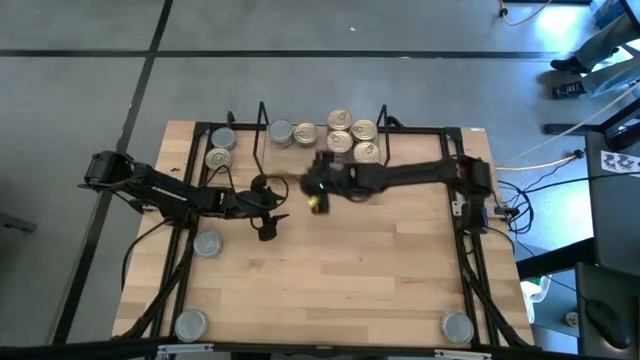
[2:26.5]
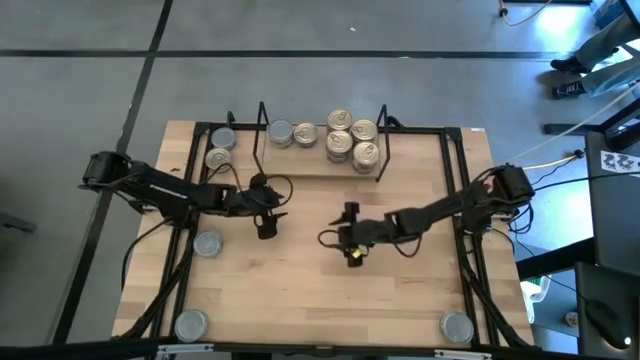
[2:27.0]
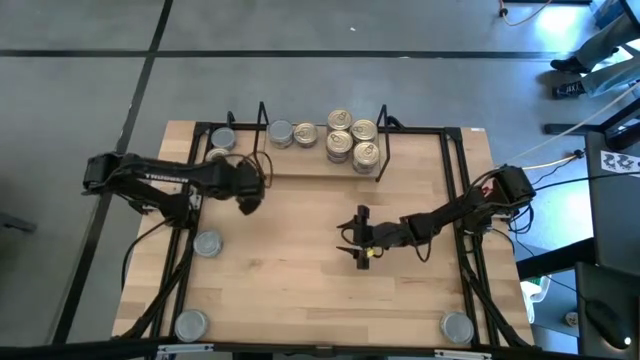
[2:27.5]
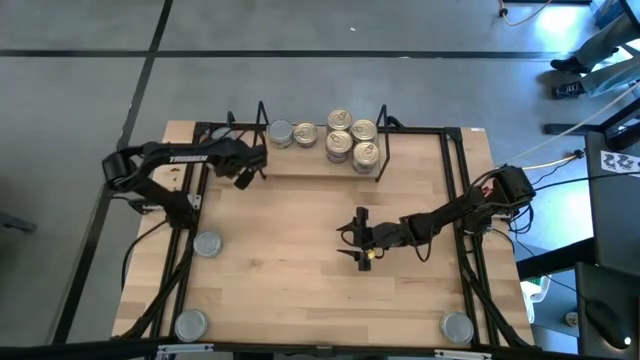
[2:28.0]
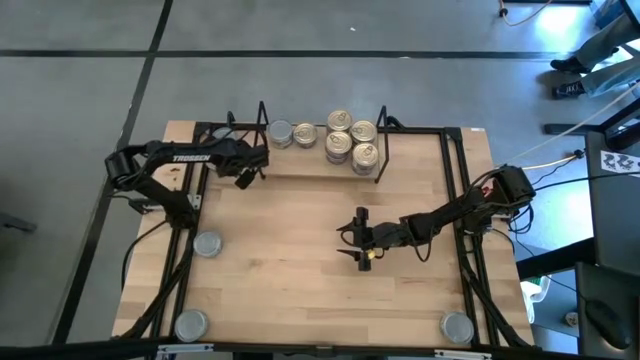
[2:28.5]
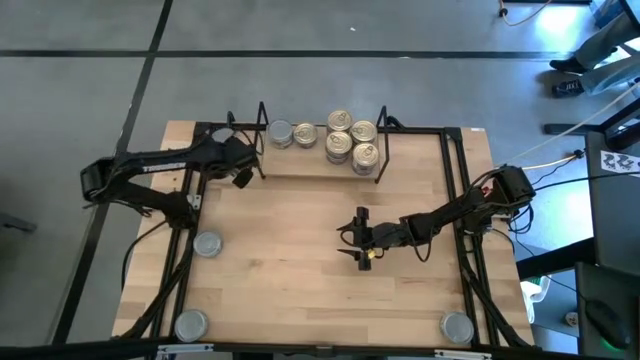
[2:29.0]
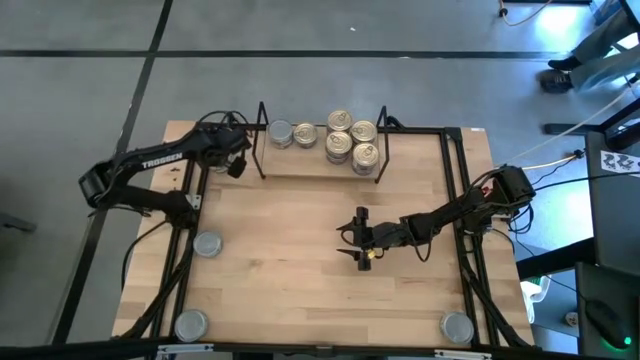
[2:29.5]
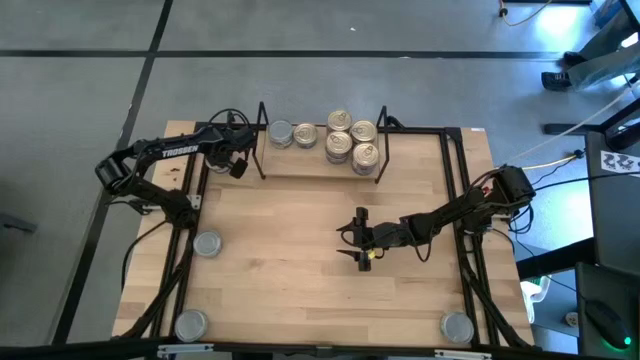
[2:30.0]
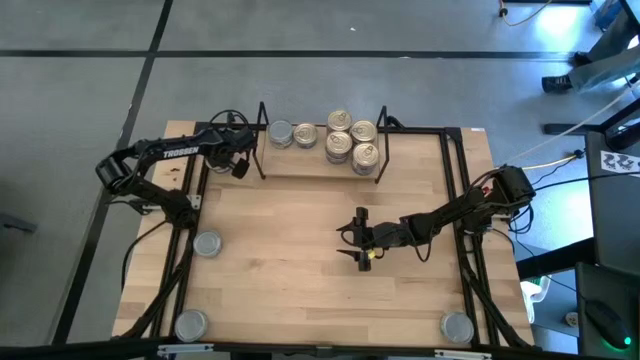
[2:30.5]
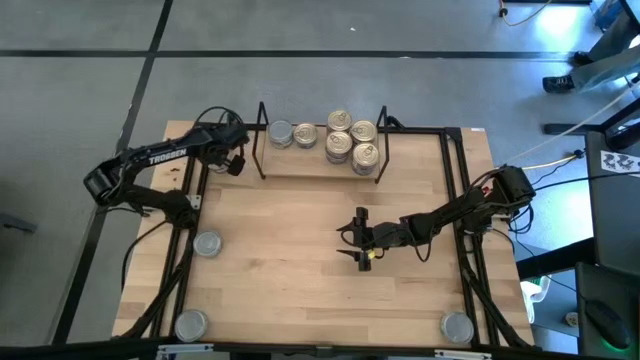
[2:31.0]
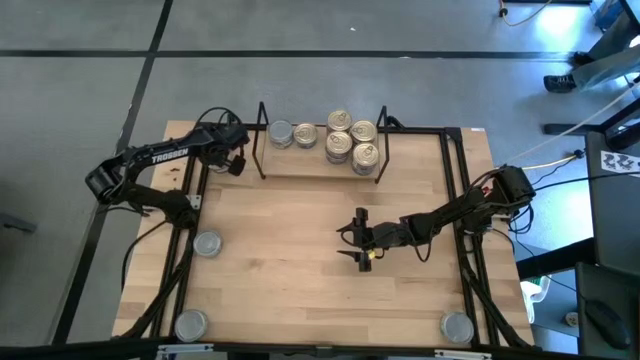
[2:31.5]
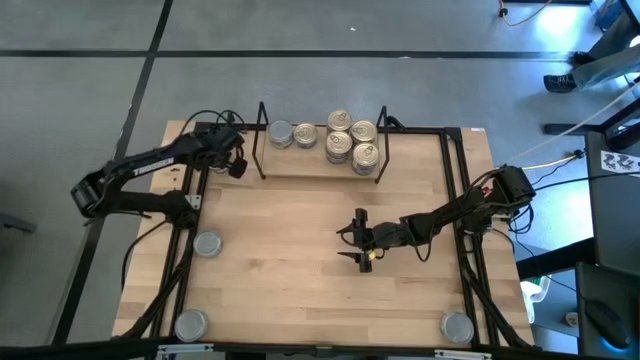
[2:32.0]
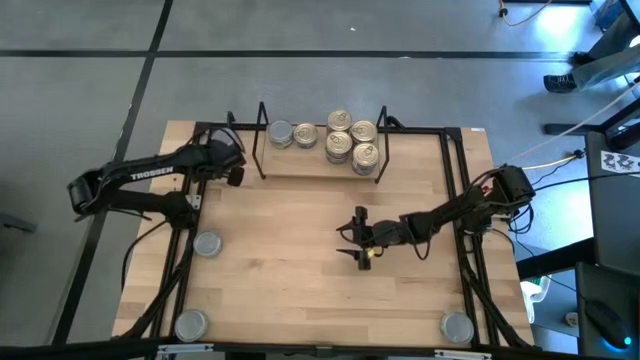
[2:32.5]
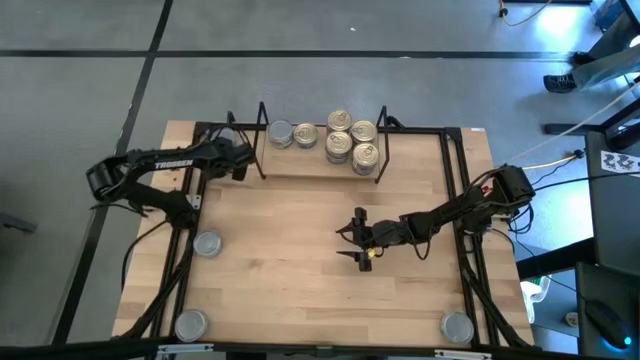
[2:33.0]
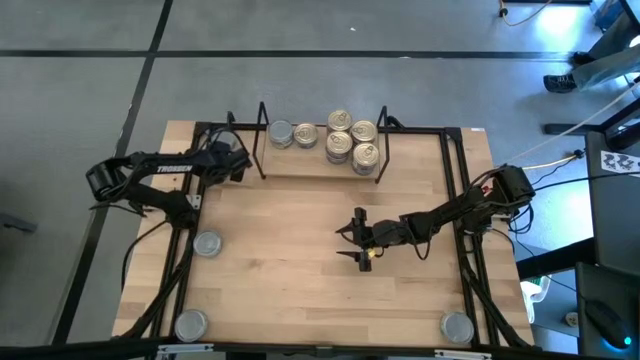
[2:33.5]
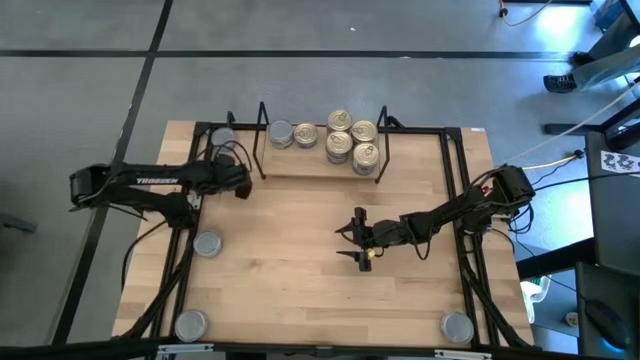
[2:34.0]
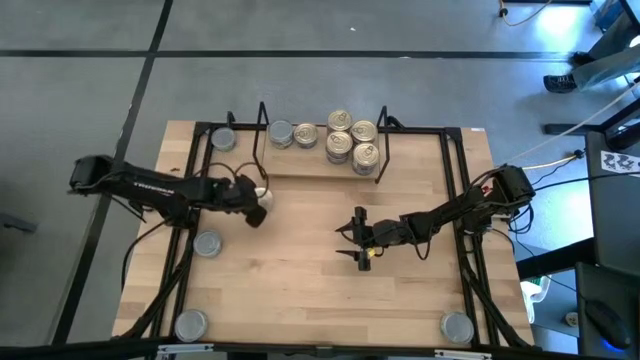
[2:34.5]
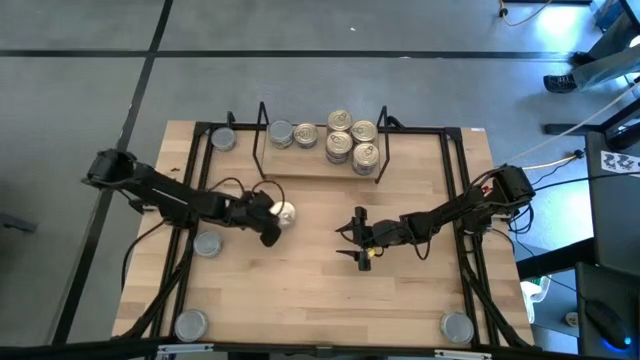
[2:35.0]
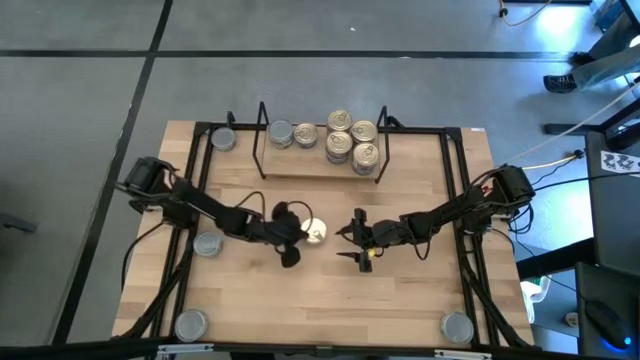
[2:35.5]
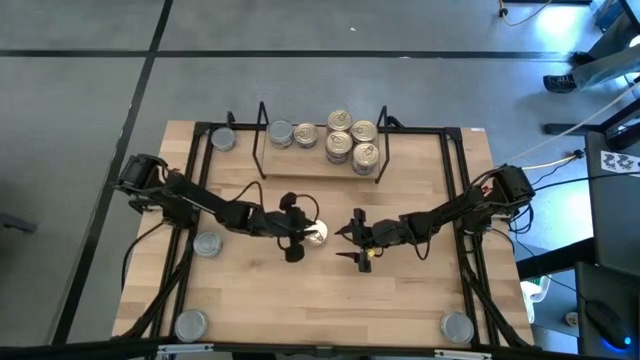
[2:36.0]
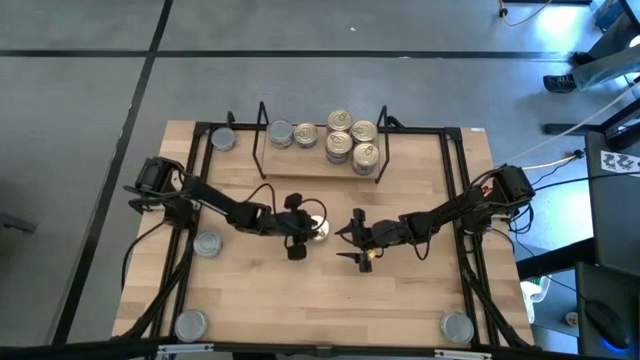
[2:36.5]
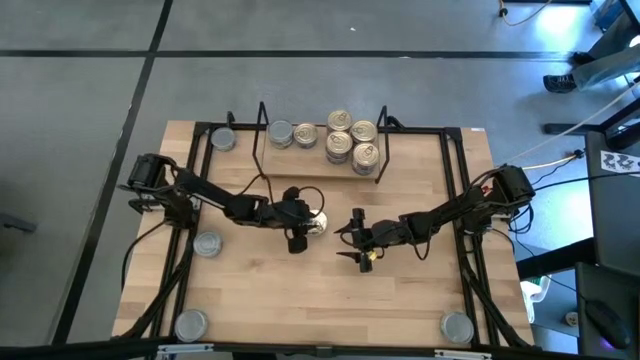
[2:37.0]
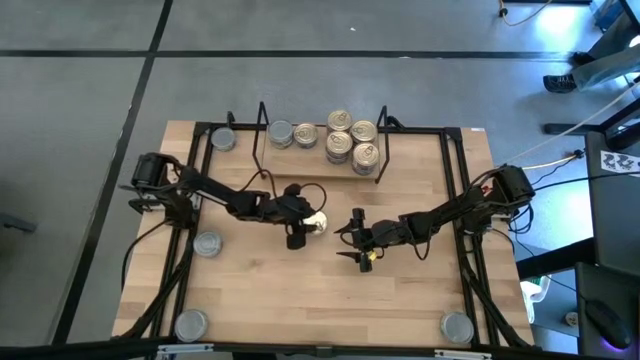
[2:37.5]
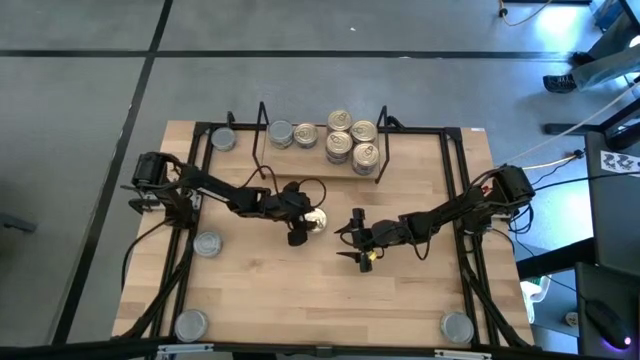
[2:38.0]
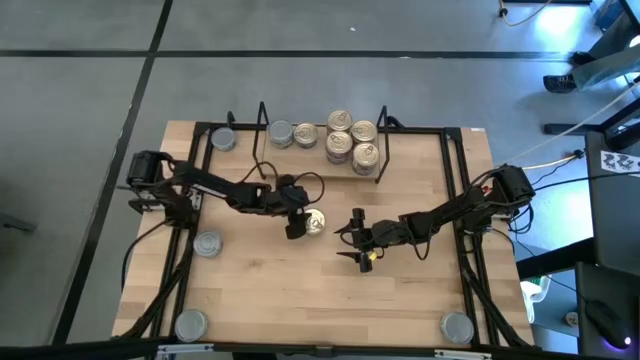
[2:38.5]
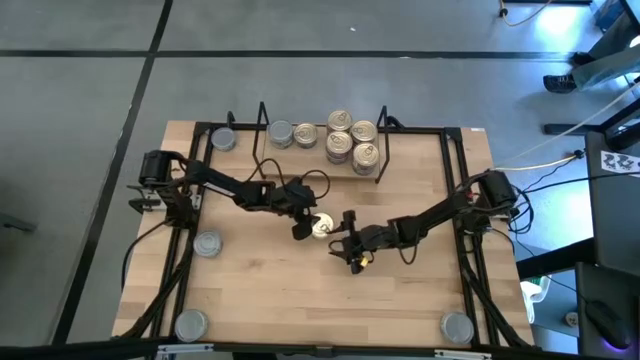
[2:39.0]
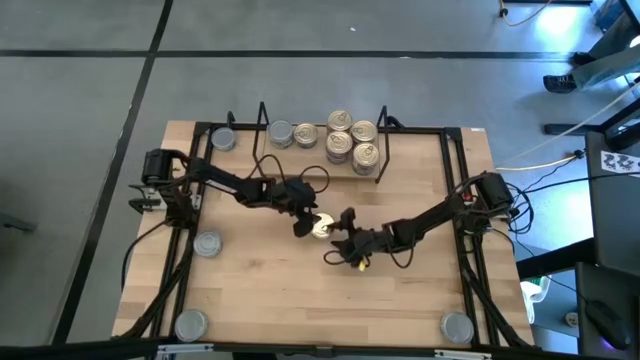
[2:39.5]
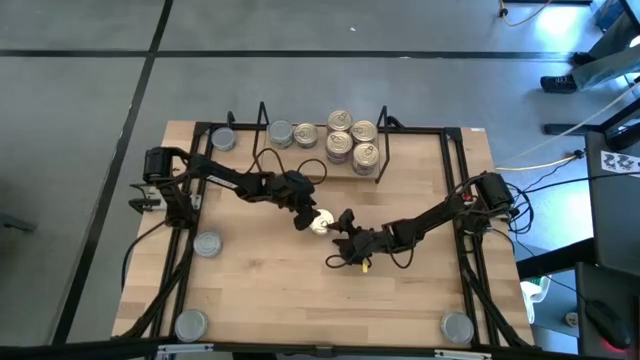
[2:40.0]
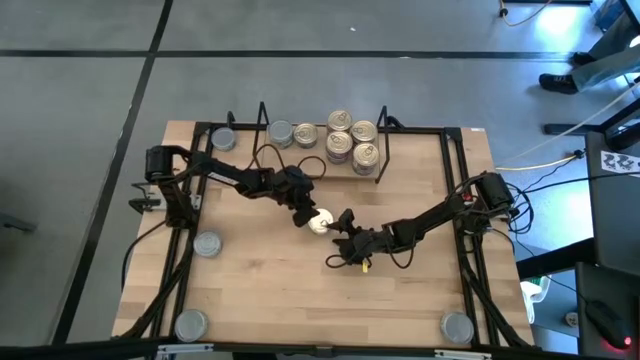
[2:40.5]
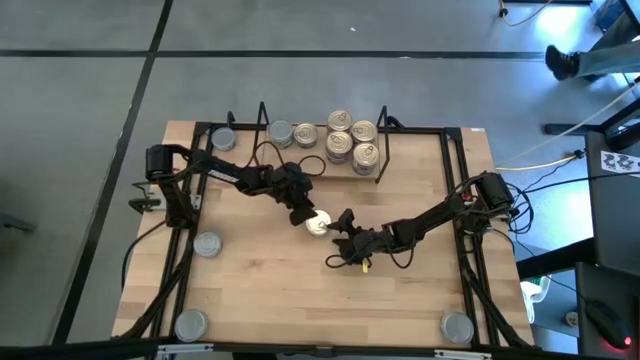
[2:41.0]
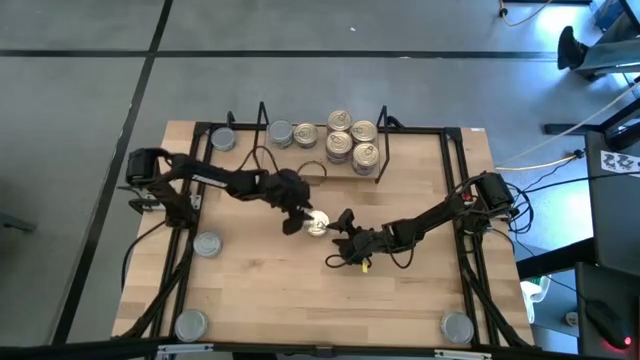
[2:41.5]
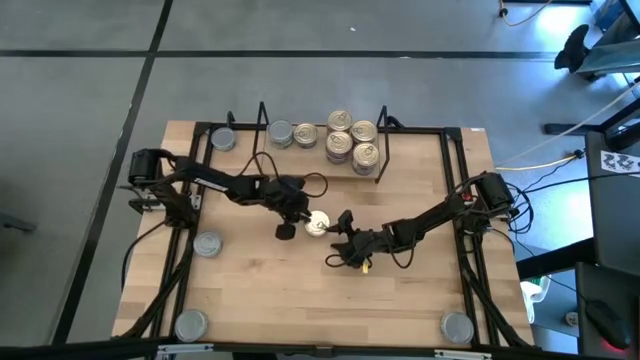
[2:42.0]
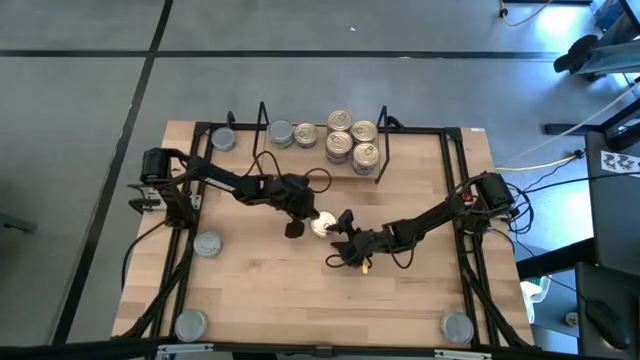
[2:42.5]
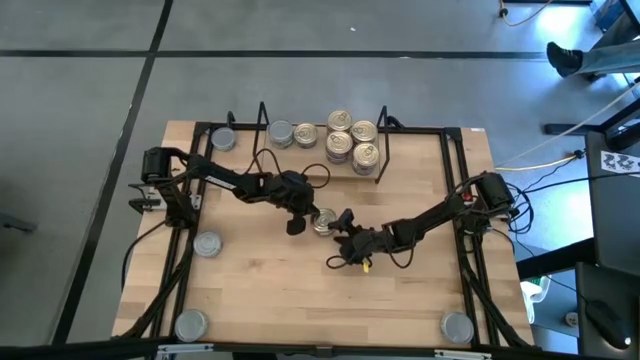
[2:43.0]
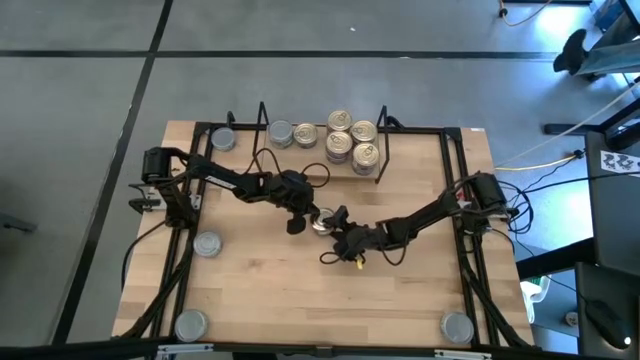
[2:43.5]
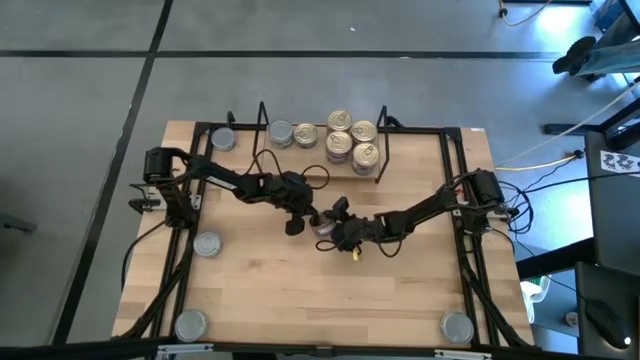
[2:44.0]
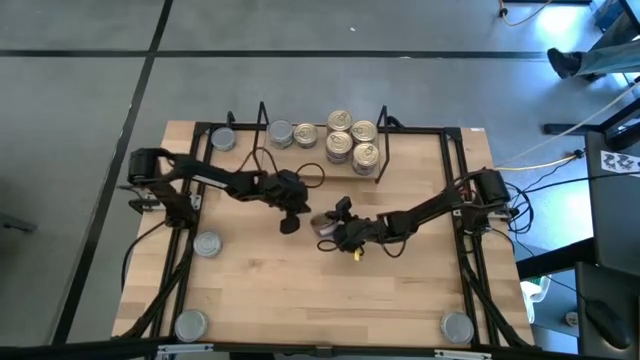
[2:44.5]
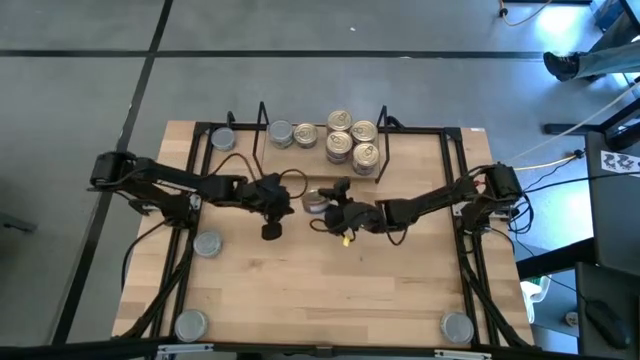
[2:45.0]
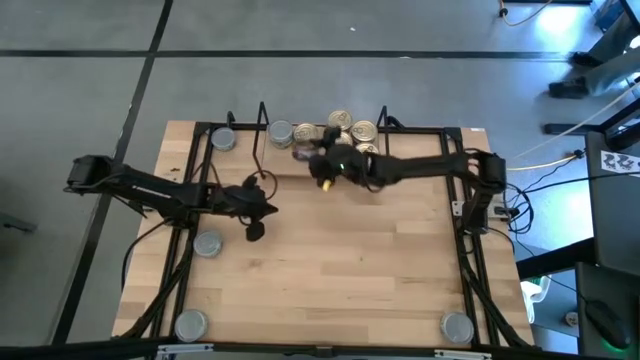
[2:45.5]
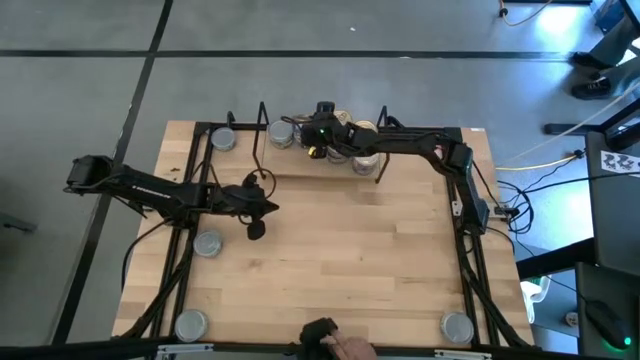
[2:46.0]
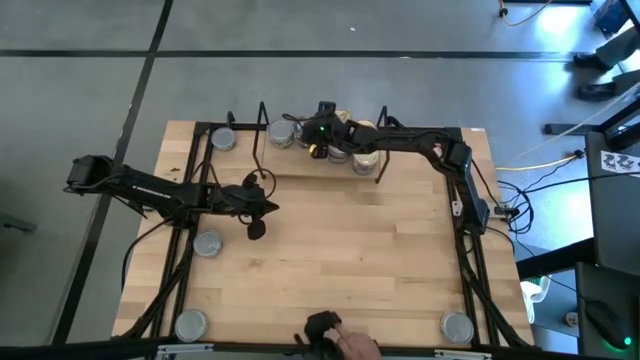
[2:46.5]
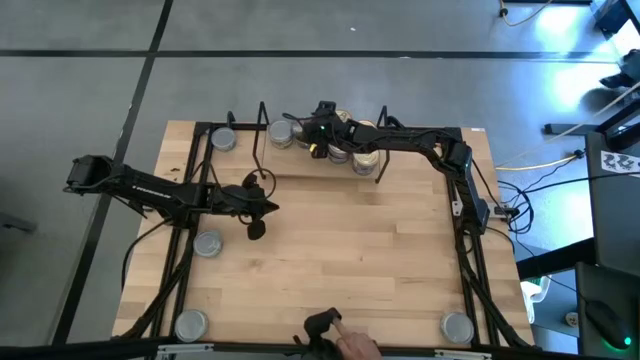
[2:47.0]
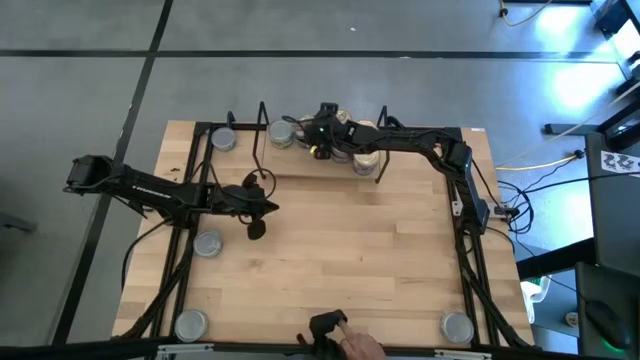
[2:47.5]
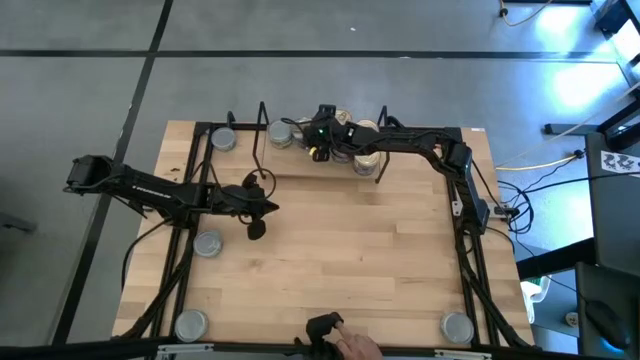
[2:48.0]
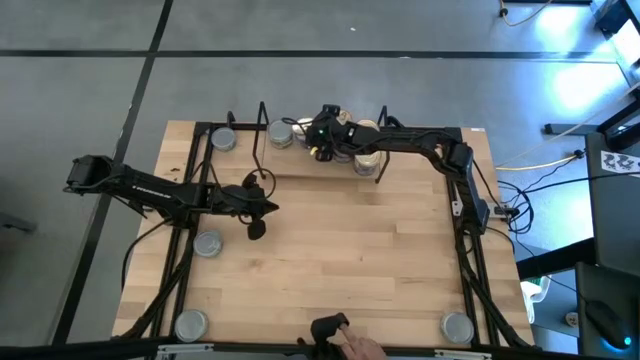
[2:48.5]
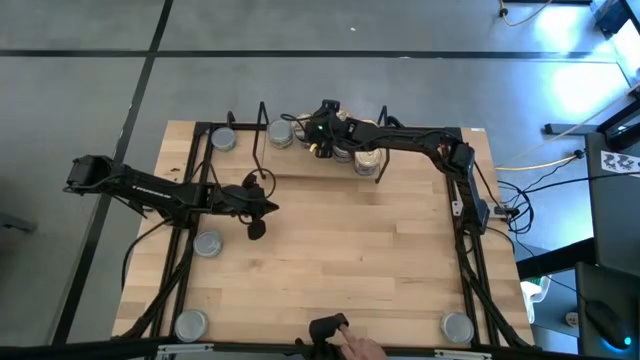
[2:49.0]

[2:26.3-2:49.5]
Task: Stack canned seafood by type on shelf
Stack the blue-pink tuna can on top of the other blue-pink can on the shelf
